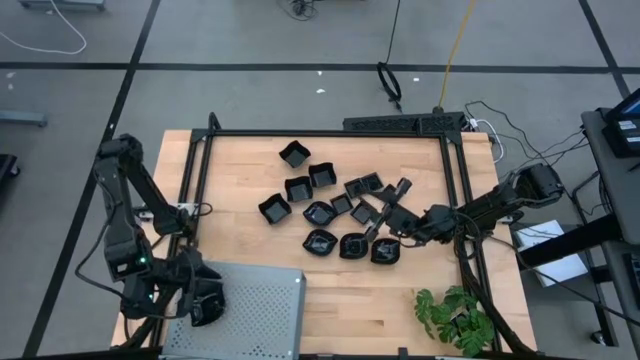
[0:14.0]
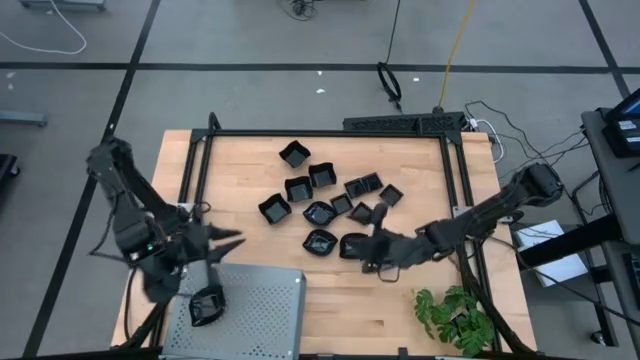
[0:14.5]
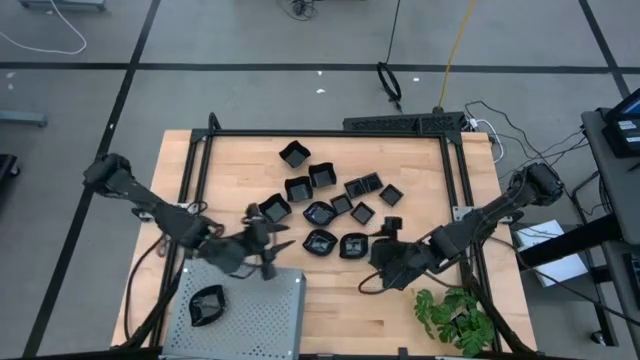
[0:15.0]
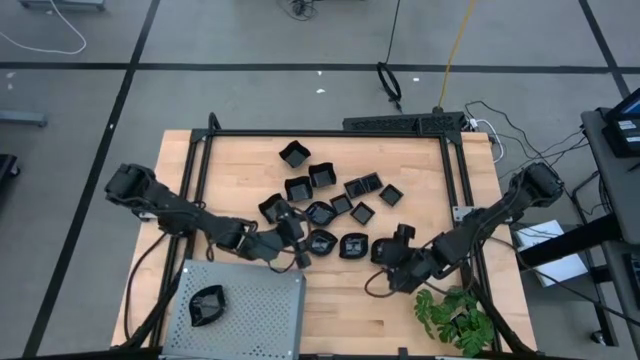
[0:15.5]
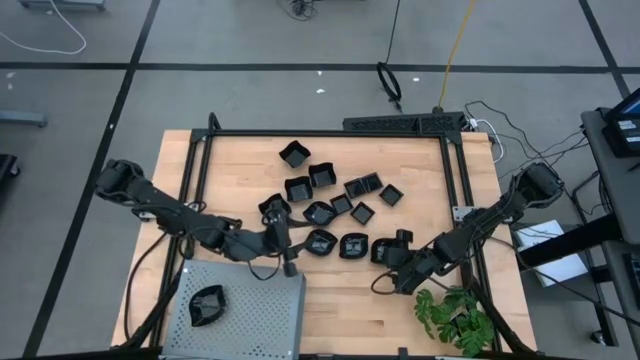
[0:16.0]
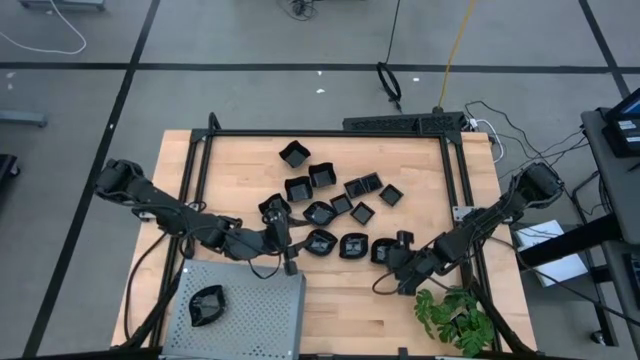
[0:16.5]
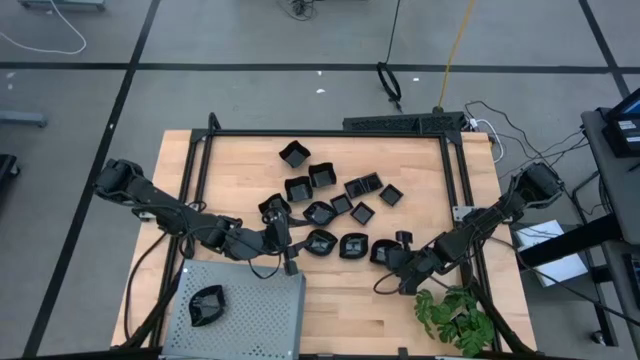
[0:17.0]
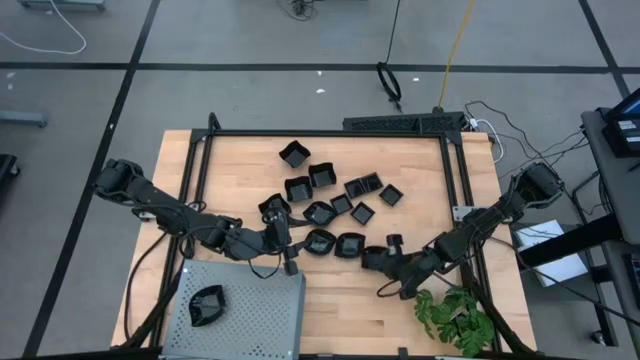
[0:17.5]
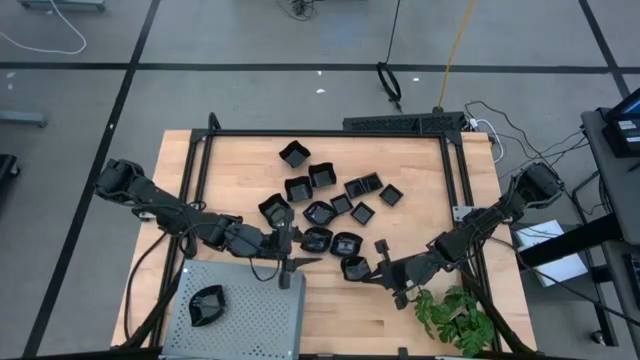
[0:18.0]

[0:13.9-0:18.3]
Task: Pick & Place Mini shaped plates
Stack the leaf-shaped plate on top of the other leaf-shaped plate on the shelf

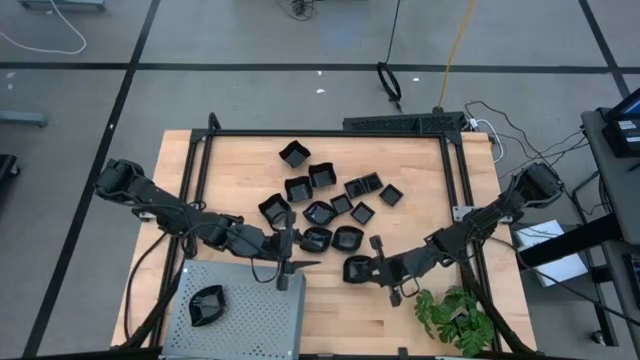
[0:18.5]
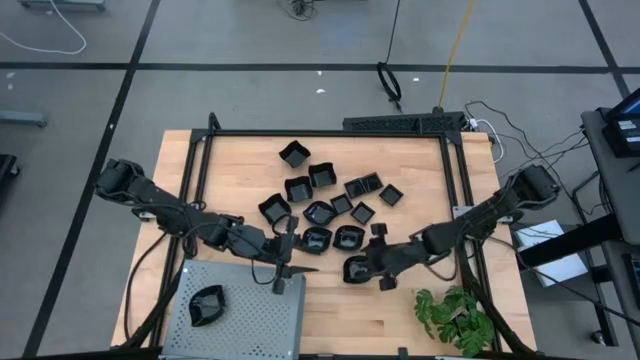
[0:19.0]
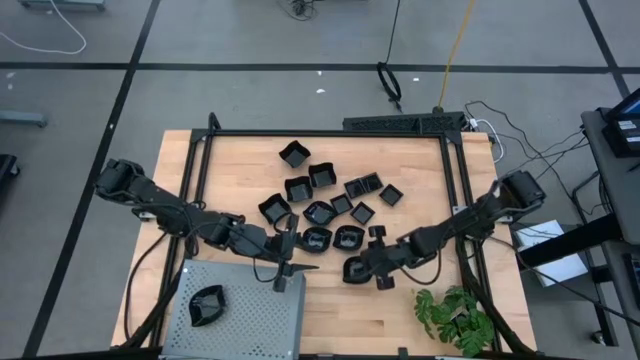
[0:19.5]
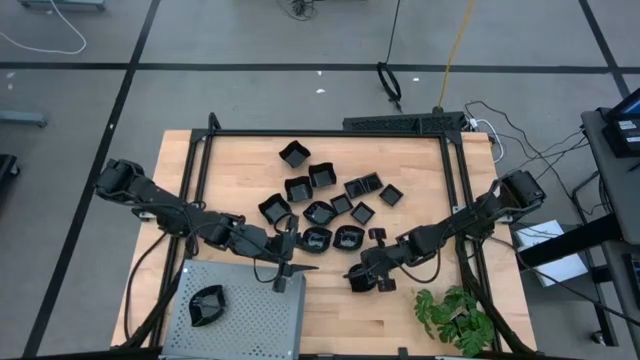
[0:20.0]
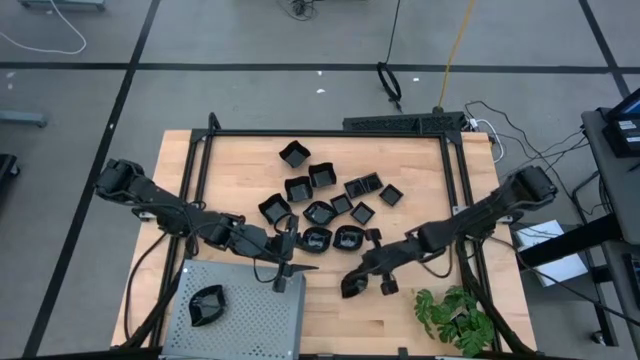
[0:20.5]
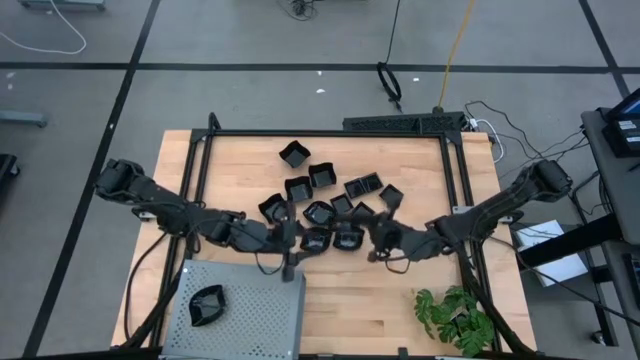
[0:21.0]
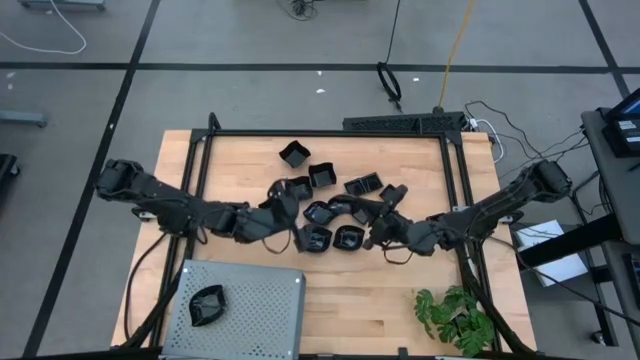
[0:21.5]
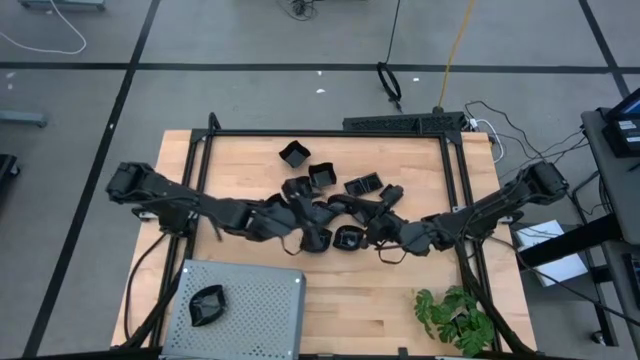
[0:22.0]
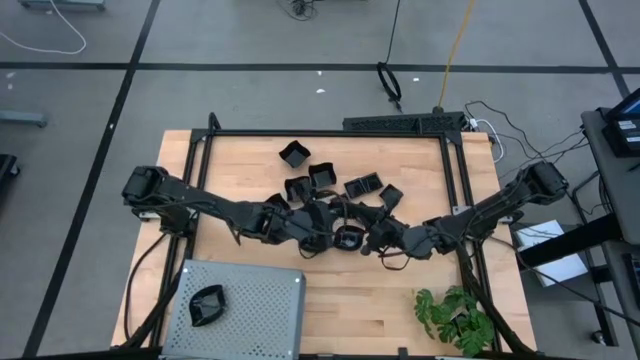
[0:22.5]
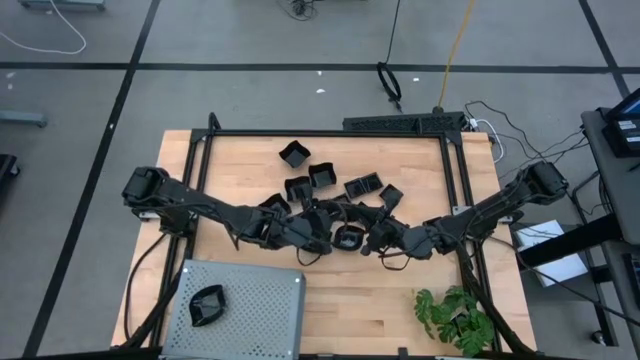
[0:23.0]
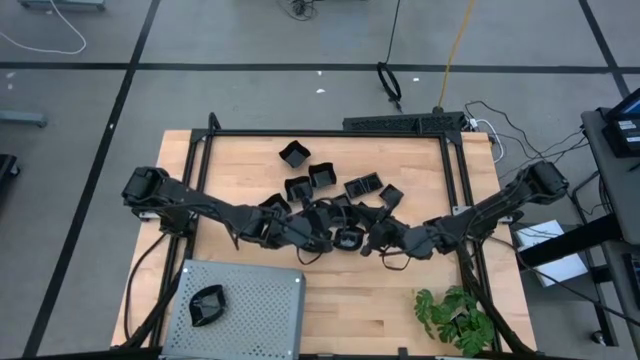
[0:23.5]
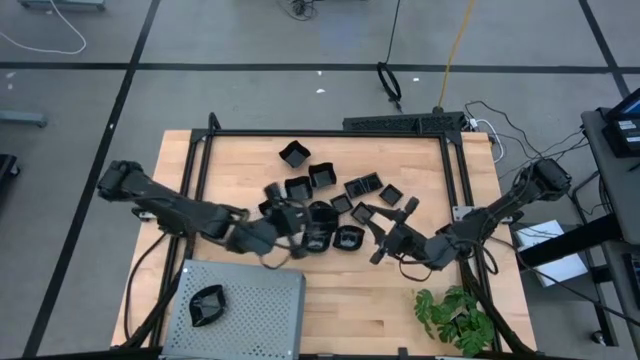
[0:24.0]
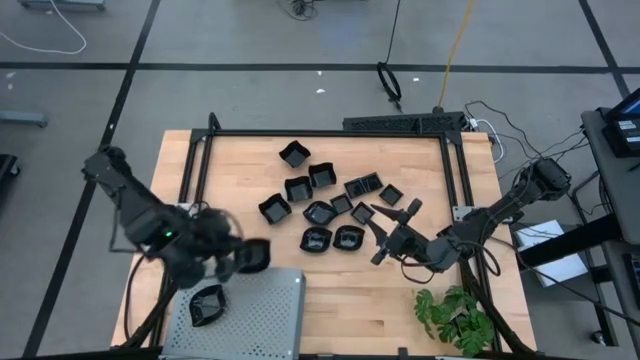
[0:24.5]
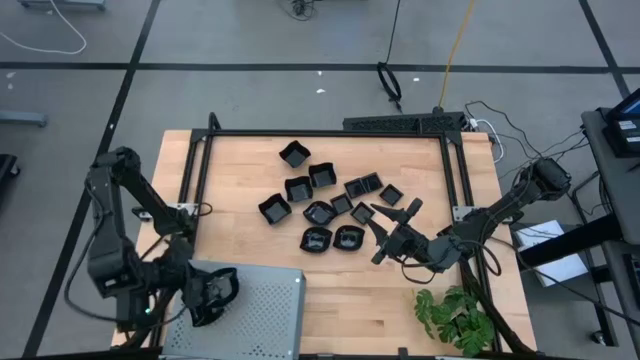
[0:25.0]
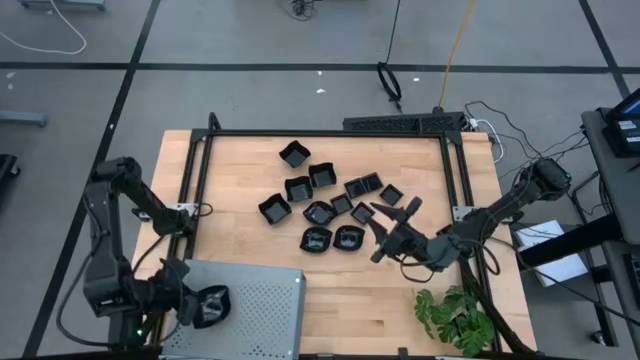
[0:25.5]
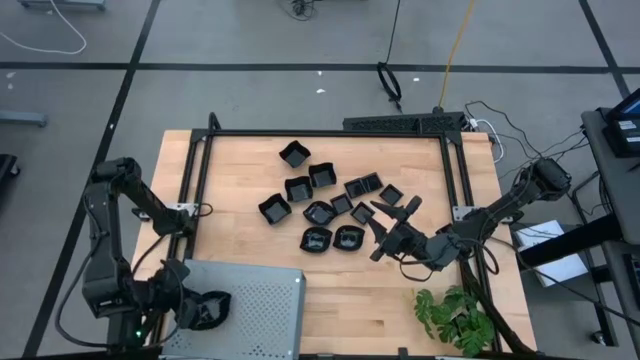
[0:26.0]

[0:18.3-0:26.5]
Stack the leaf-shaped plate on top of the other leaf-shaped plate on the shelf

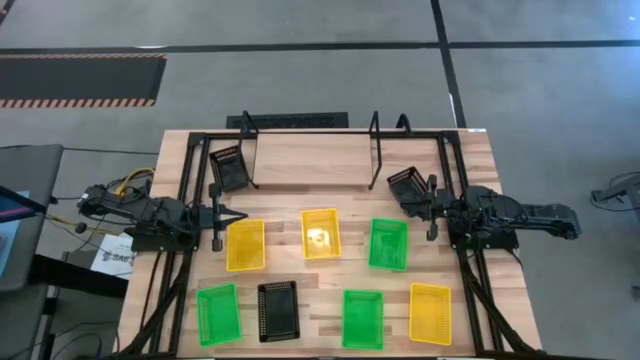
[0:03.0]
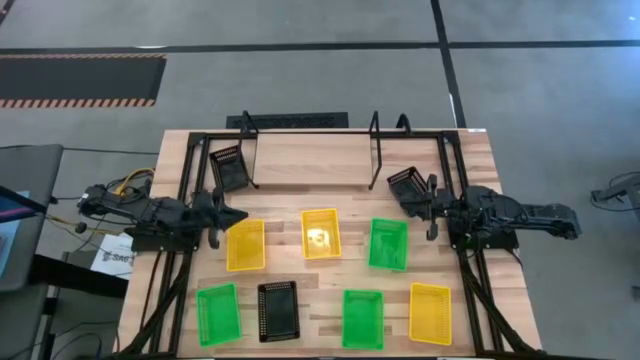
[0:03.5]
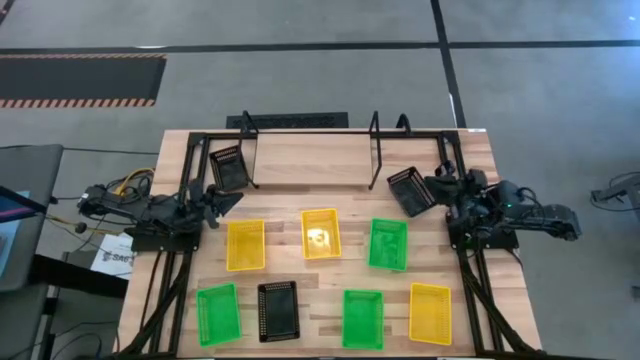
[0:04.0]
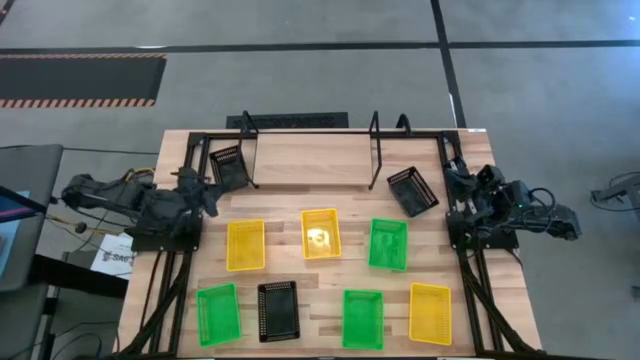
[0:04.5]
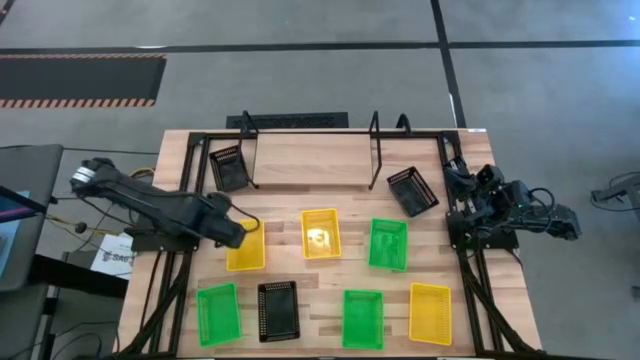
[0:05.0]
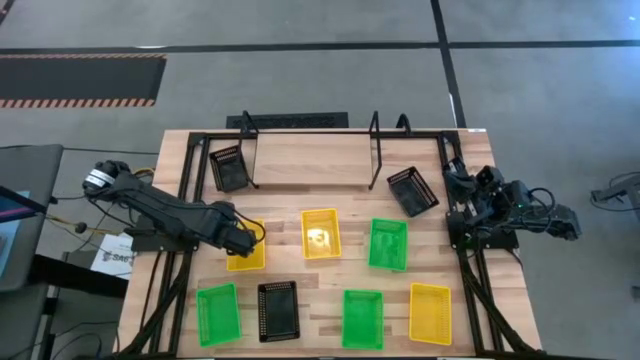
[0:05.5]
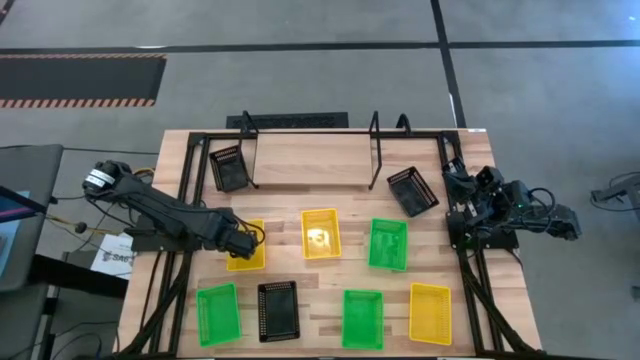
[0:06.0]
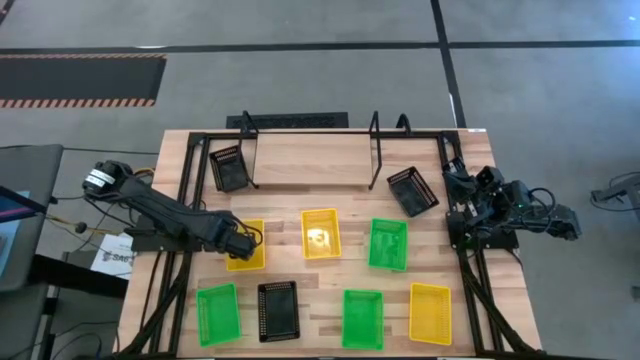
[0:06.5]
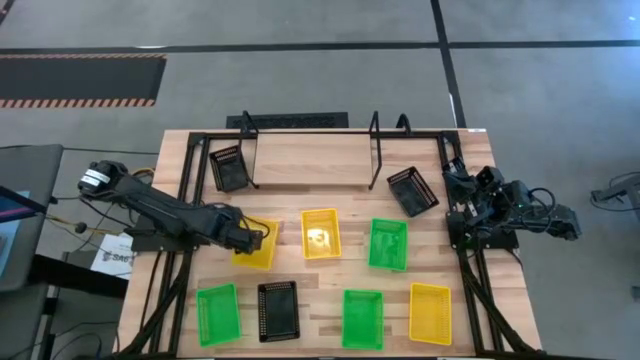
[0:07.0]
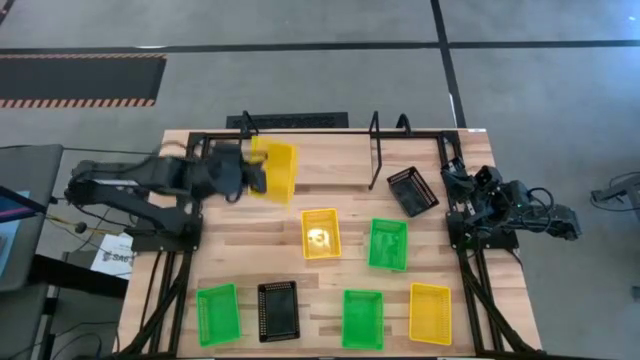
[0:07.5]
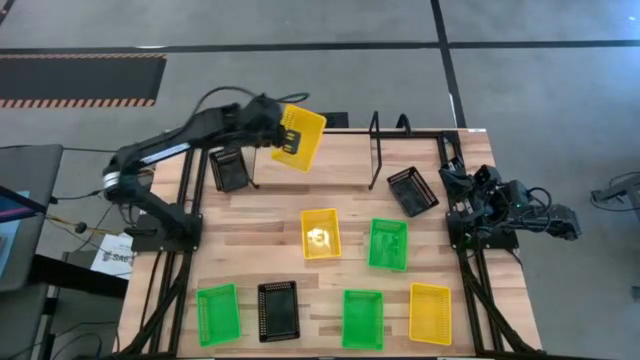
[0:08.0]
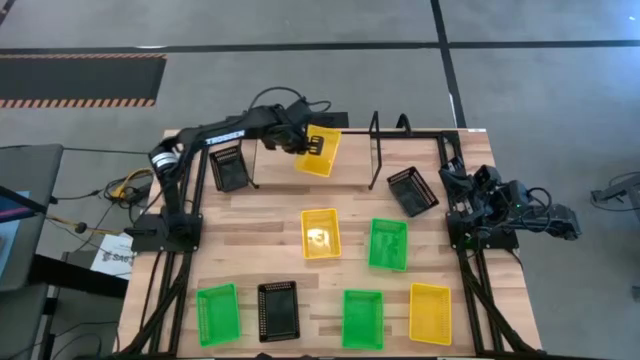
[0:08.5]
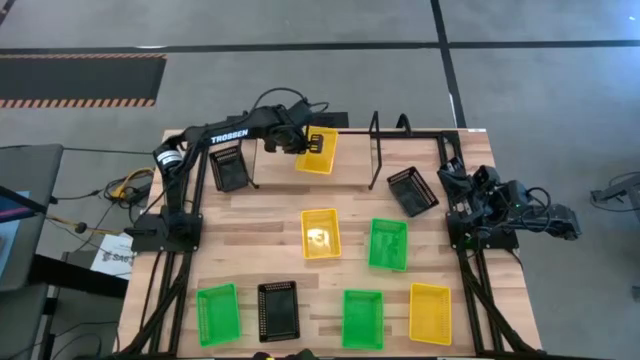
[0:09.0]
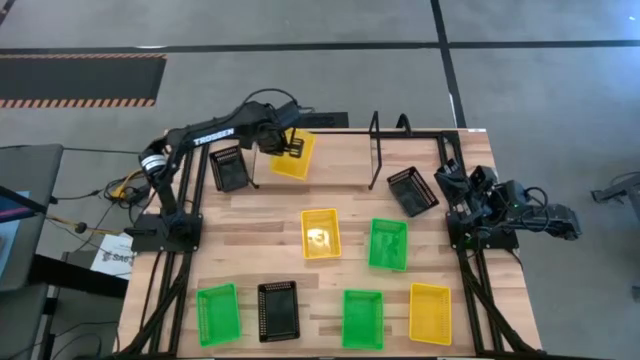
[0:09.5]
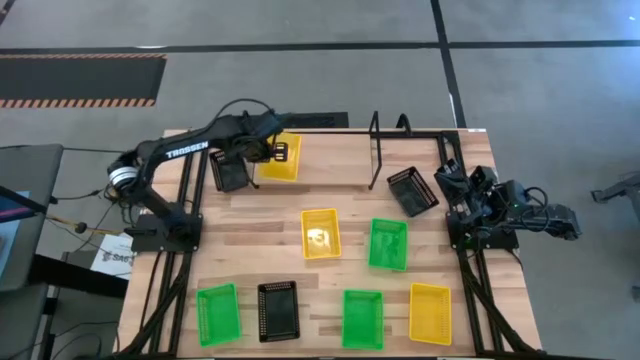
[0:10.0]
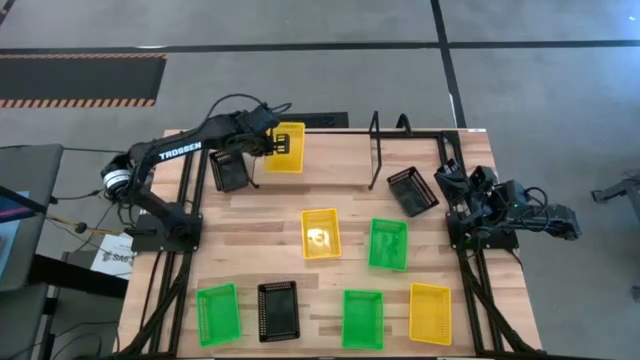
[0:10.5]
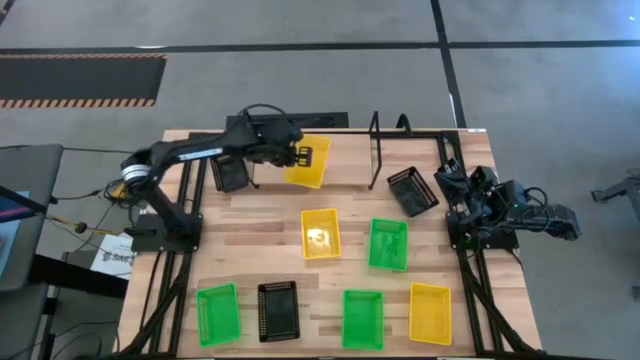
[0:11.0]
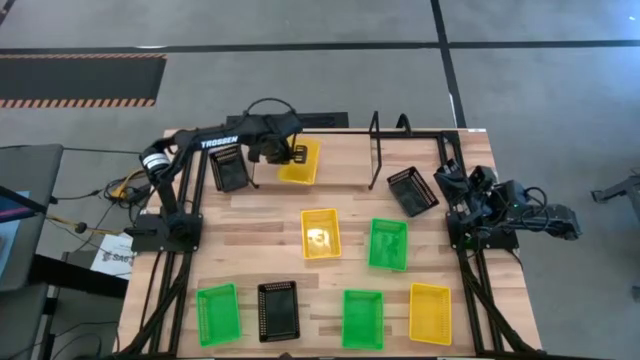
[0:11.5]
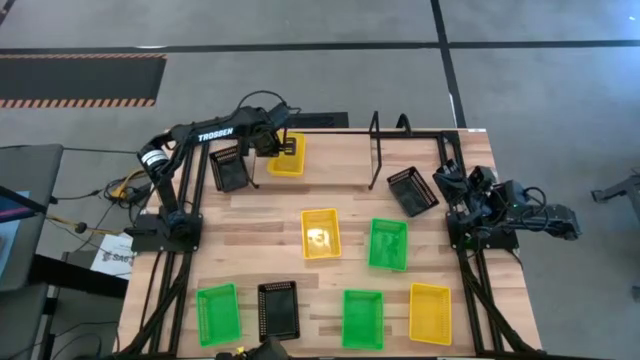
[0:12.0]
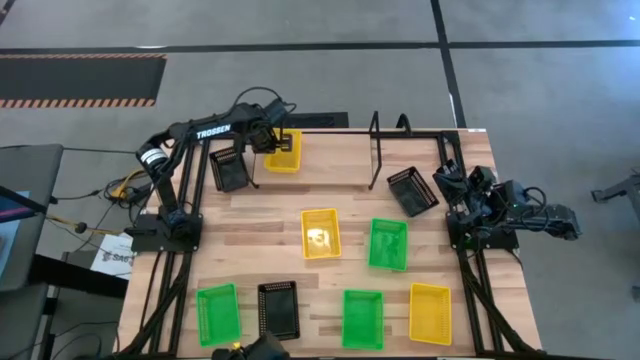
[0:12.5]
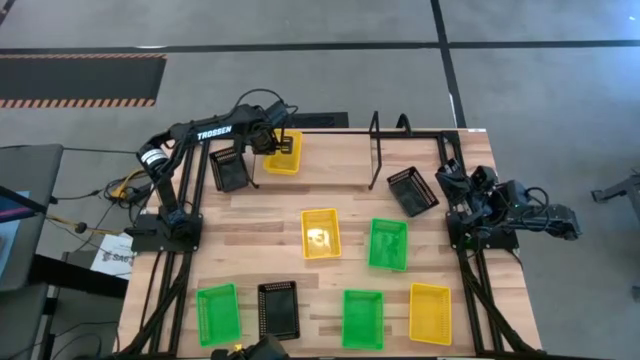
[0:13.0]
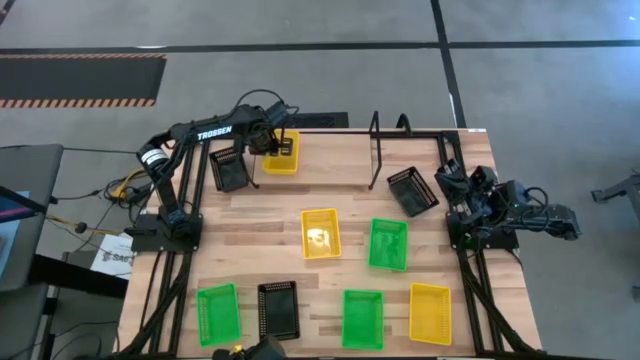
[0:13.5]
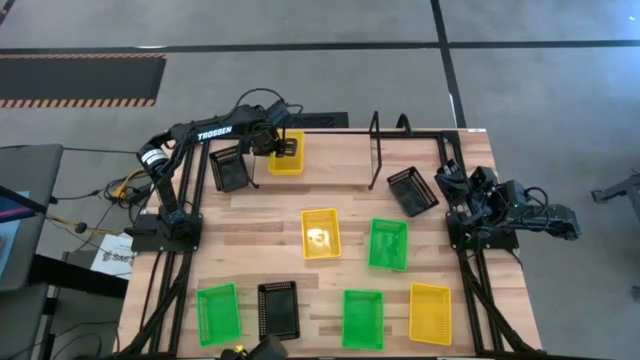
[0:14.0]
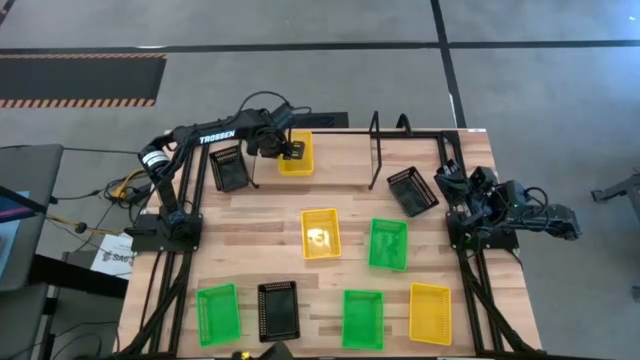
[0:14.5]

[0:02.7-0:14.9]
Task: Stack baskets on shelf by color
Put the top left yellow bin on the shelf
